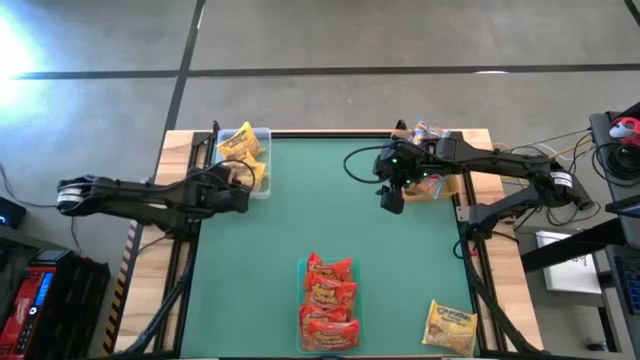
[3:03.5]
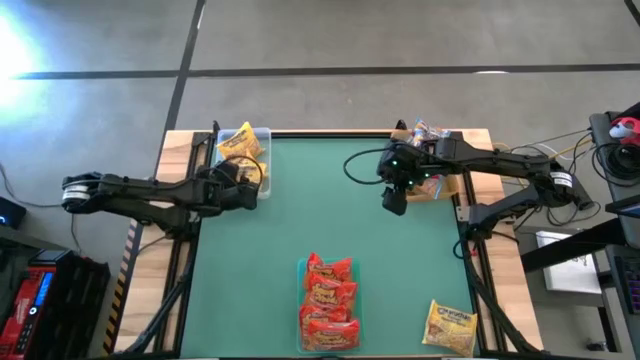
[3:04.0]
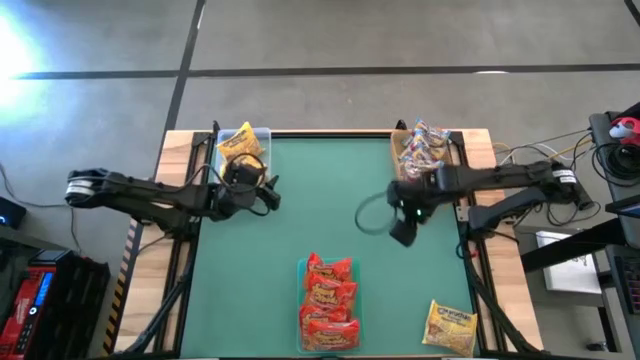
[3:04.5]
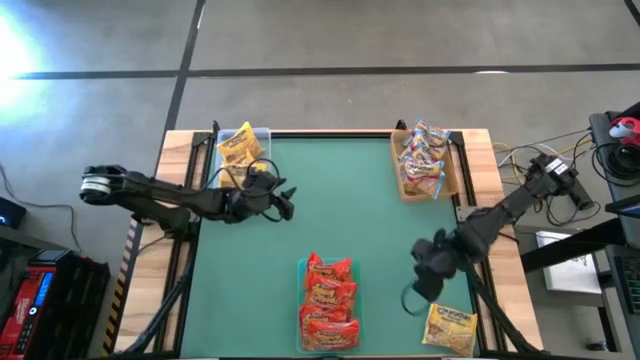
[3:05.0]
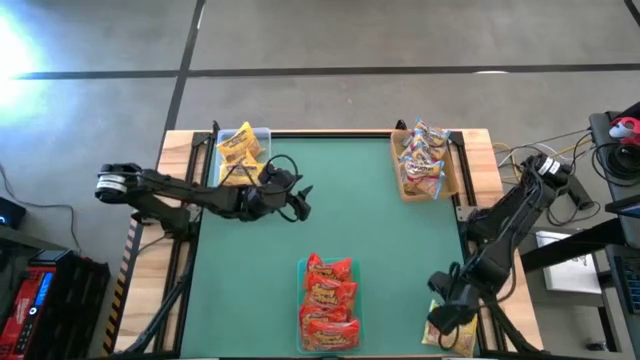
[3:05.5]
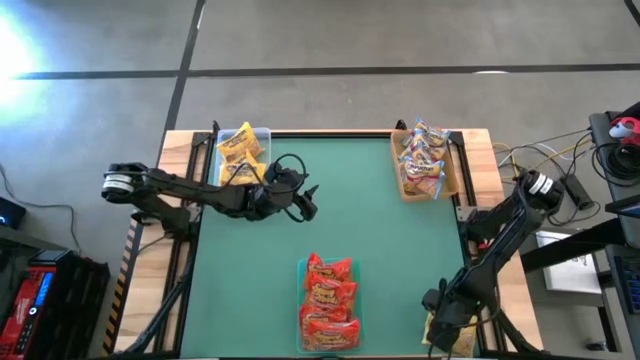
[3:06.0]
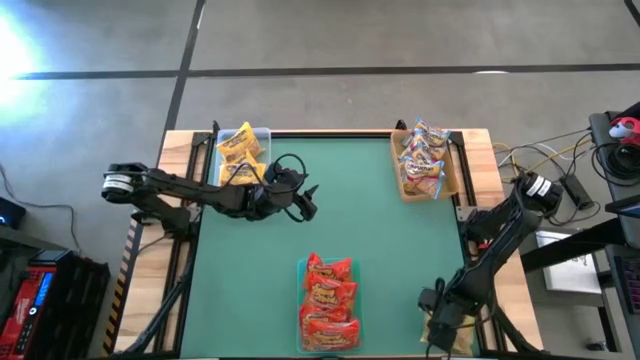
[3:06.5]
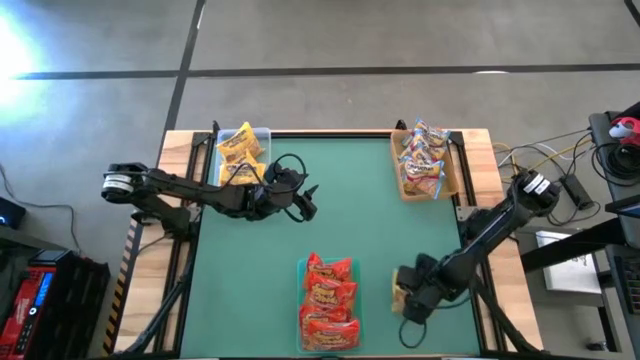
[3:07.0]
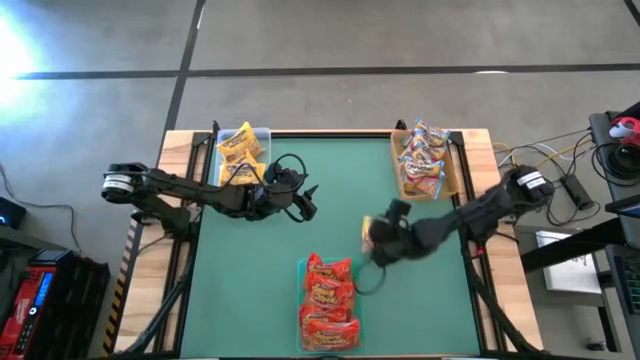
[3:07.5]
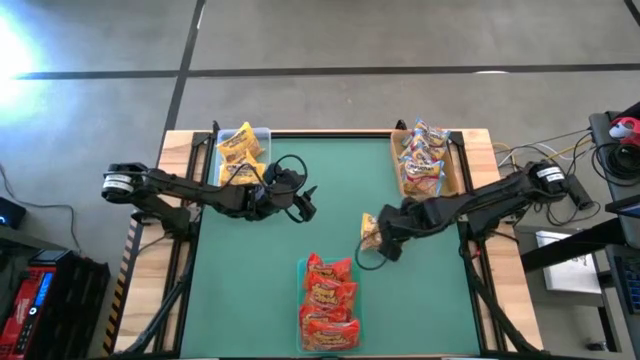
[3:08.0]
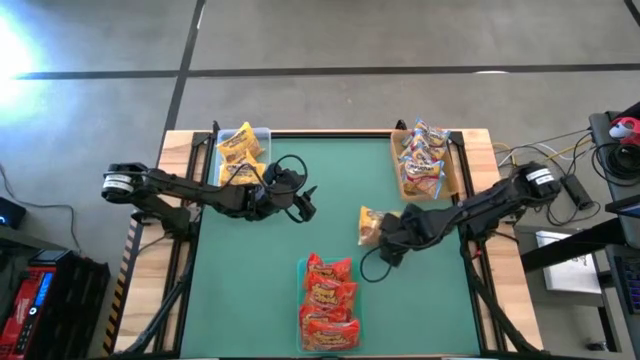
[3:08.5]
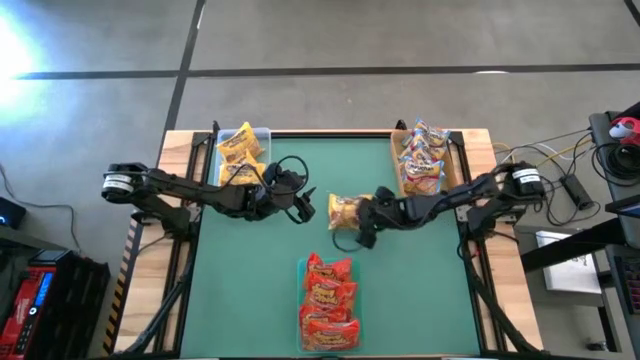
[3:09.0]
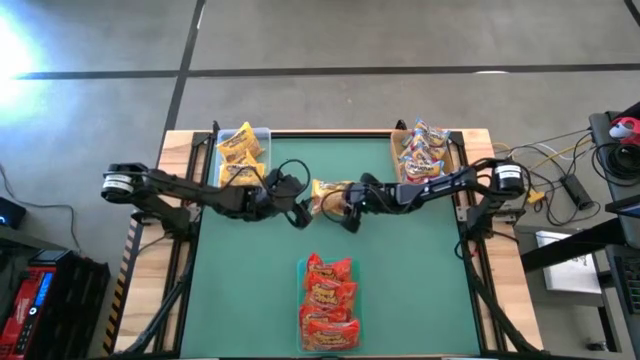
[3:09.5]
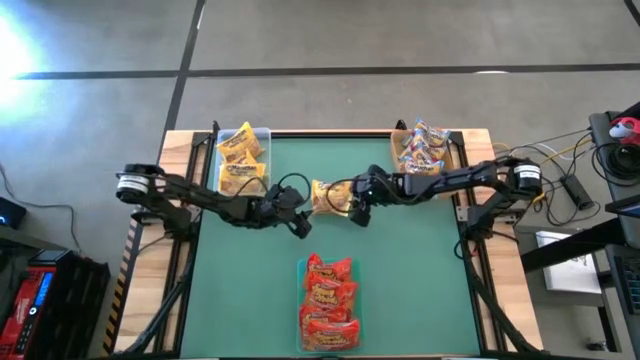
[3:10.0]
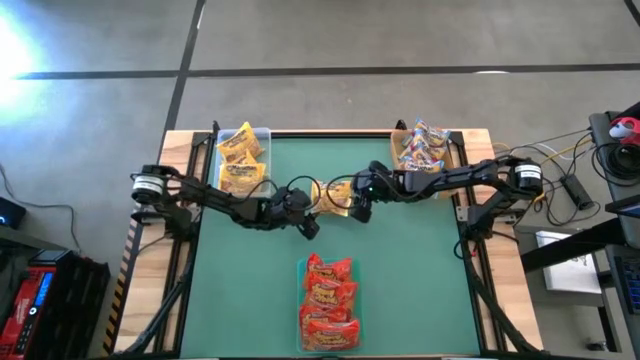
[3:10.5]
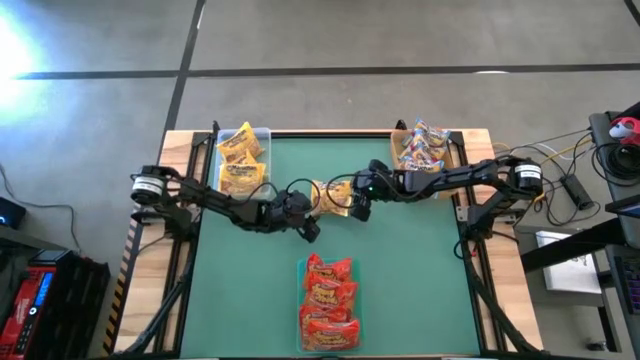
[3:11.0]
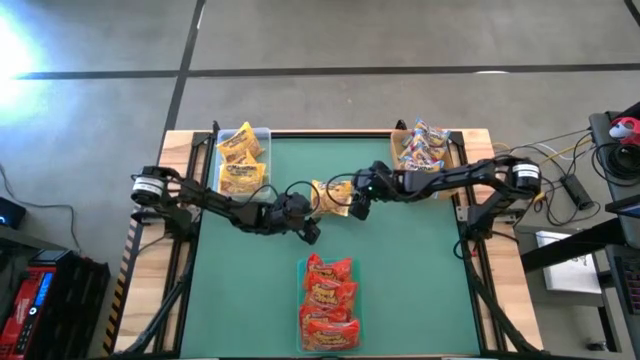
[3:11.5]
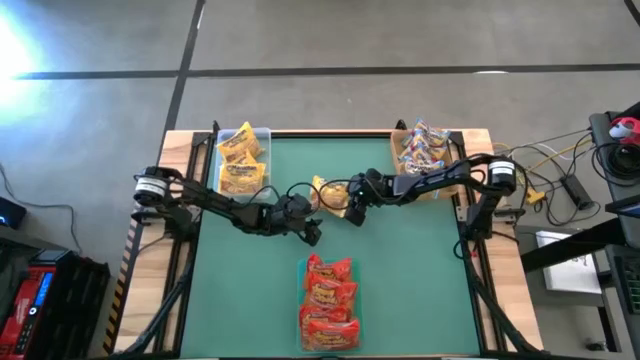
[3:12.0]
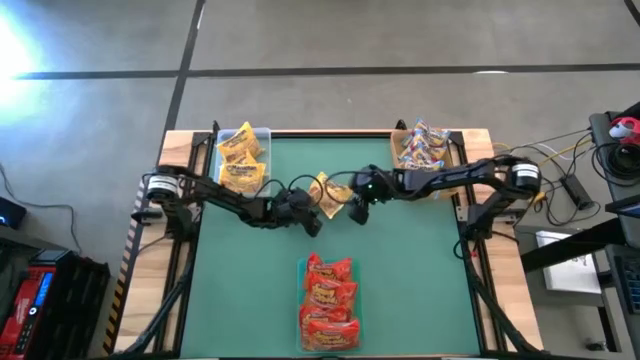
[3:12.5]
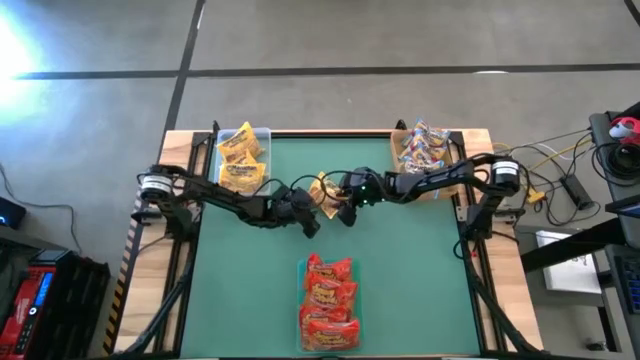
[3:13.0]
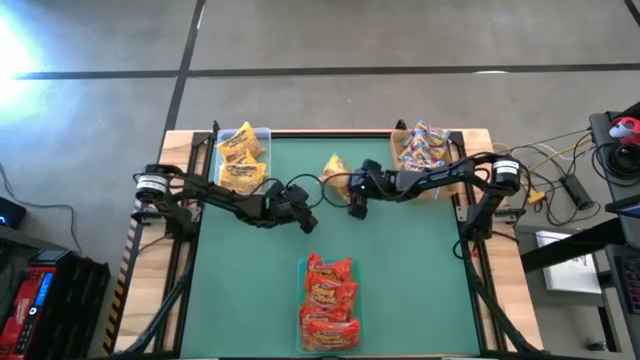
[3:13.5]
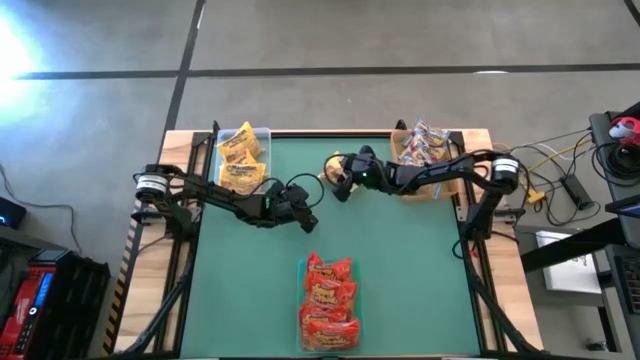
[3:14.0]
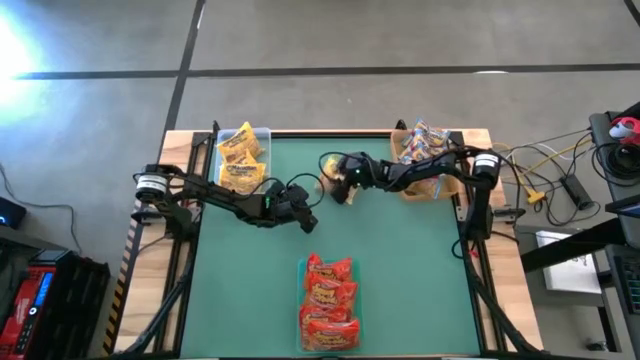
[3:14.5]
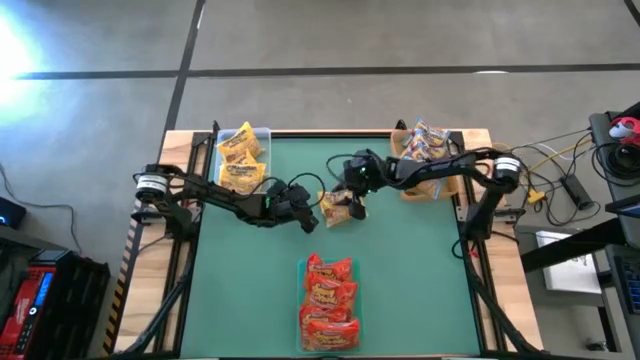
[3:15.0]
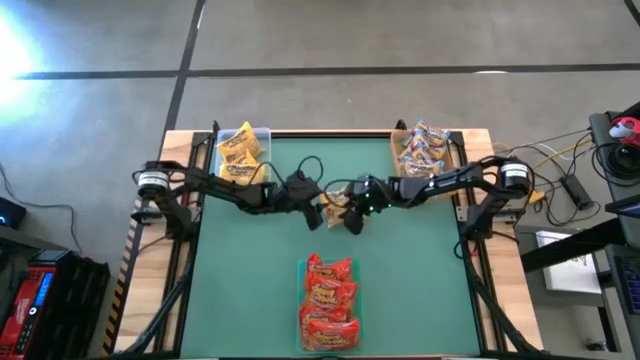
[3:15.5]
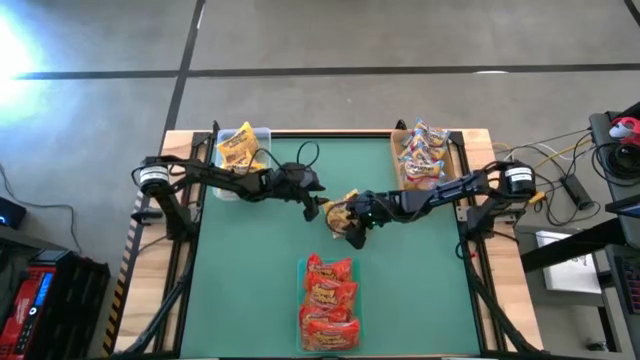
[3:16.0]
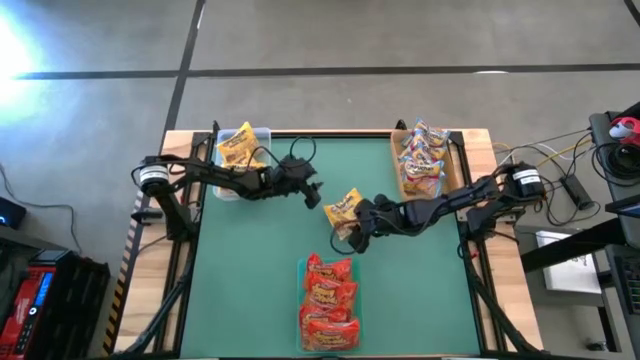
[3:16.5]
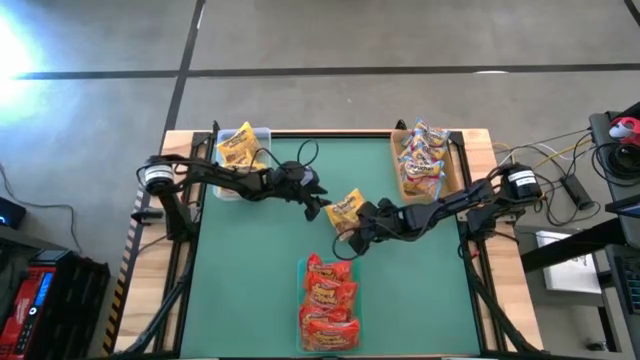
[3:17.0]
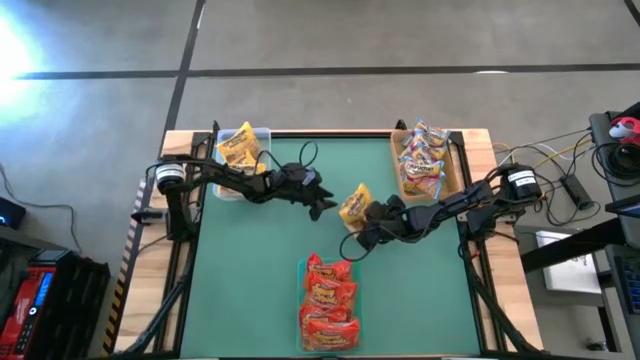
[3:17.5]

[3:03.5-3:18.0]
Task: Sort Maruchan noodles
Put the yellow noodle pack into the transparent bin

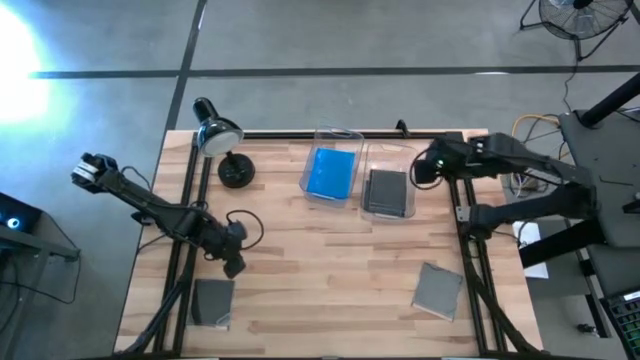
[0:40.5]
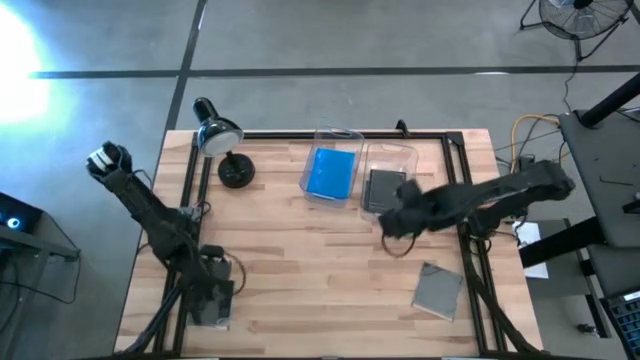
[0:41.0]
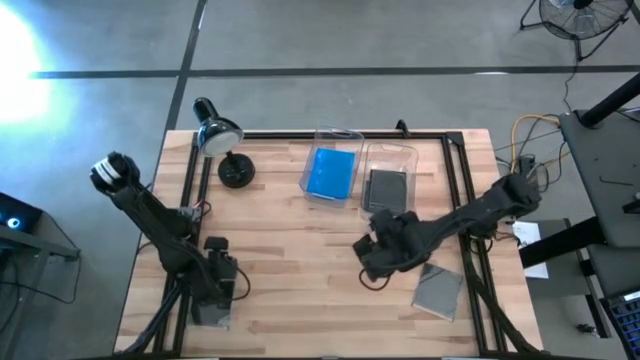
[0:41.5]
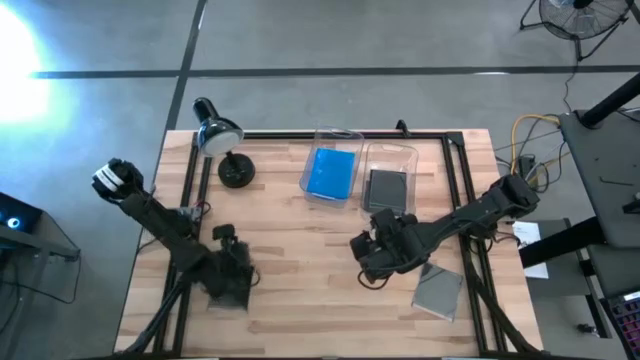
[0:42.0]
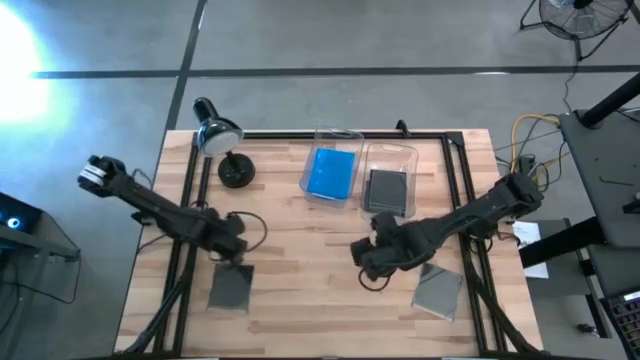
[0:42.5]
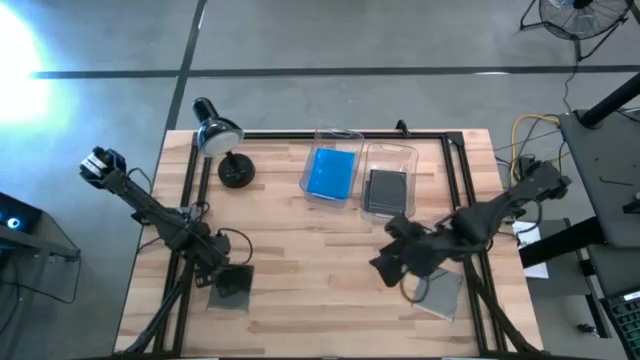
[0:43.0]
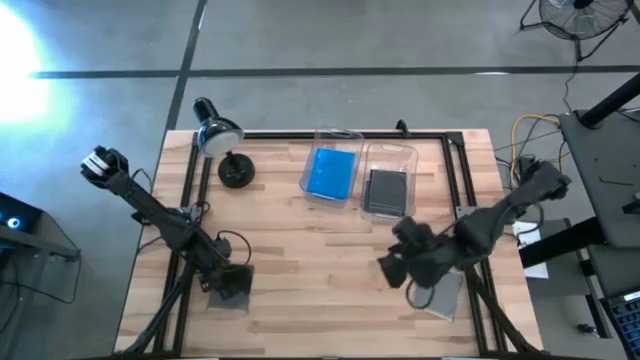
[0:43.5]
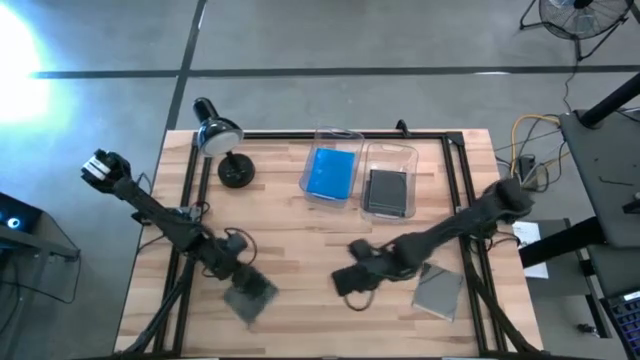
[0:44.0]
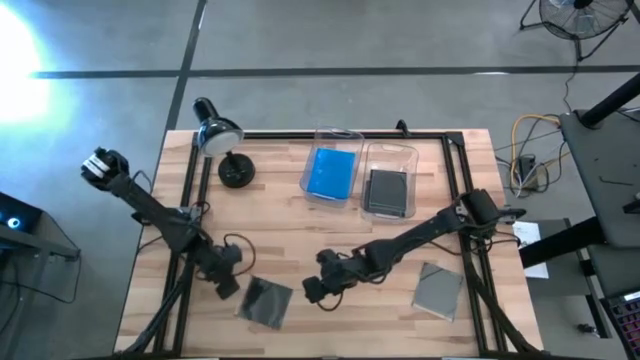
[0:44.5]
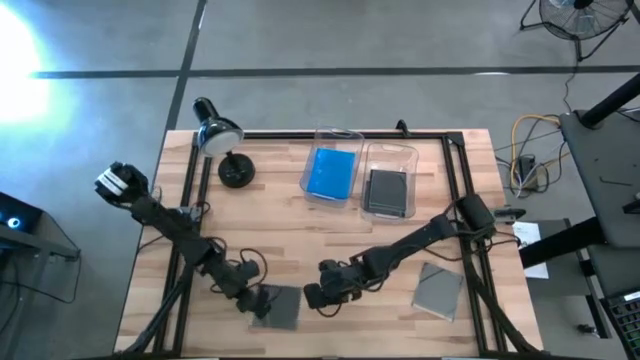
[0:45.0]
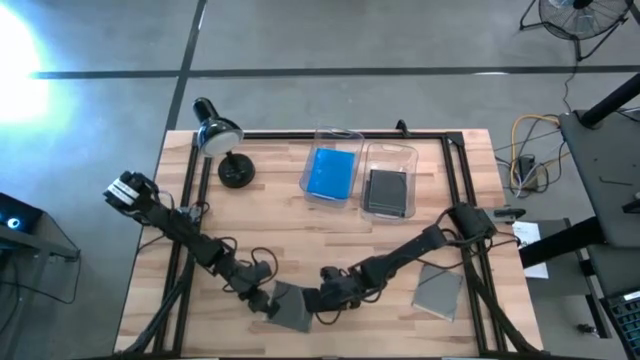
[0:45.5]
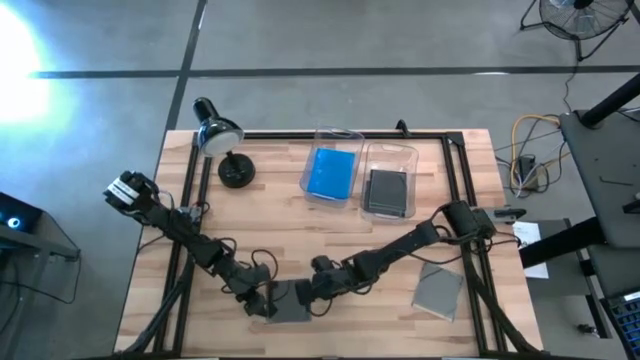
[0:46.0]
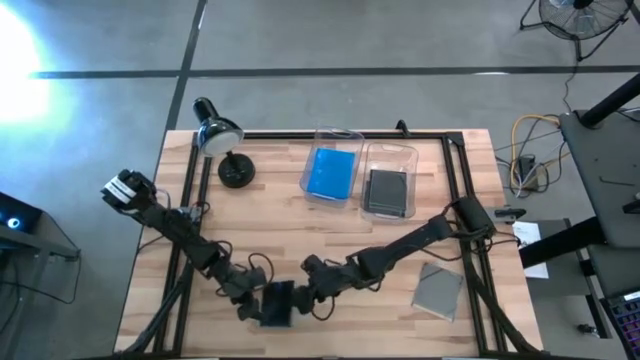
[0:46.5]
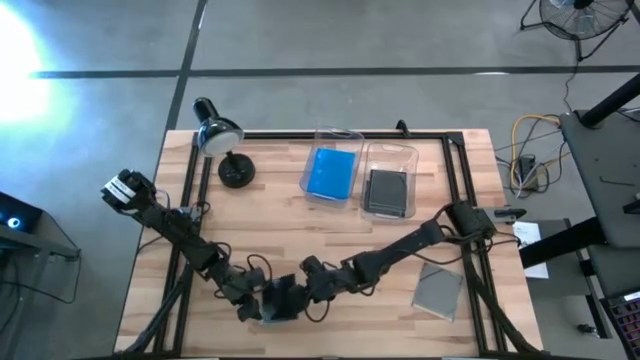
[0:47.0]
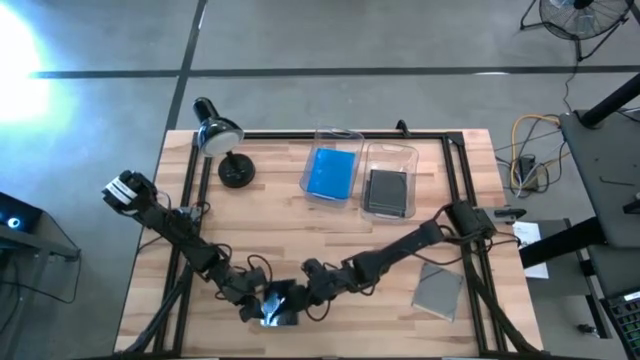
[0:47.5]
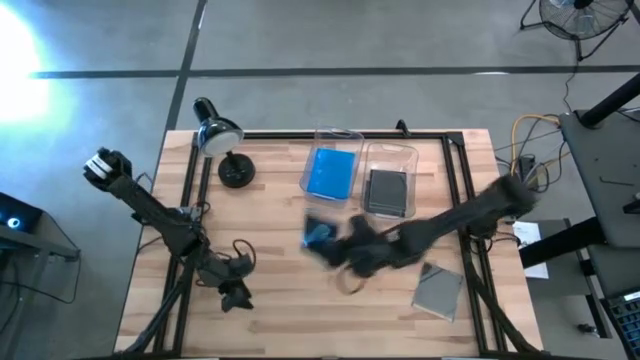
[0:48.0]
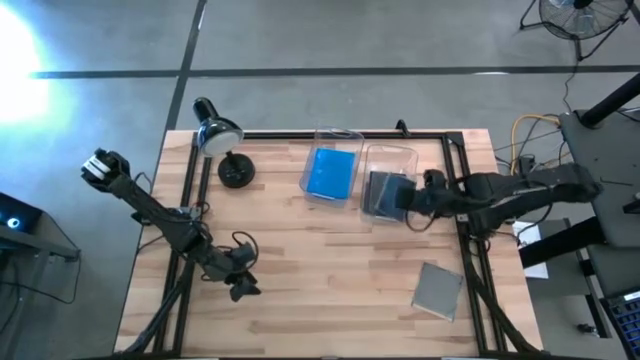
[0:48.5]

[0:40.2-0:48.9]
Task: Pick & place jewel cases by type
Put the black CD case into the right transparent bin
